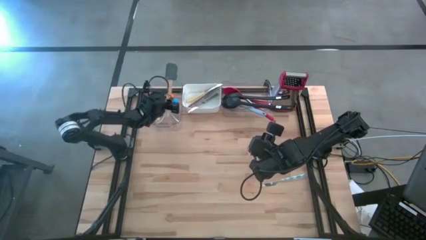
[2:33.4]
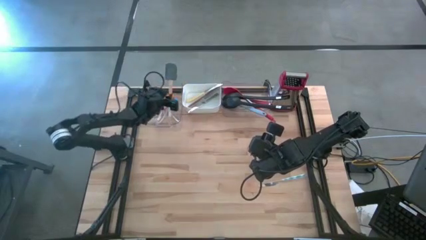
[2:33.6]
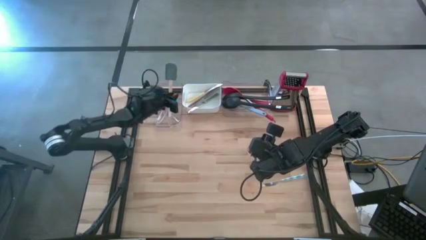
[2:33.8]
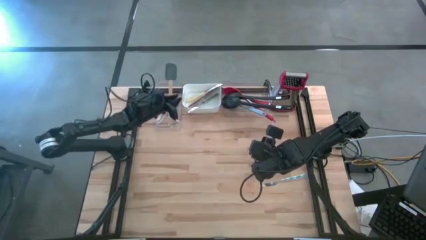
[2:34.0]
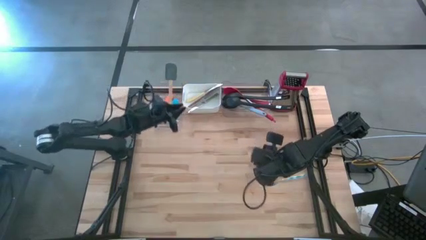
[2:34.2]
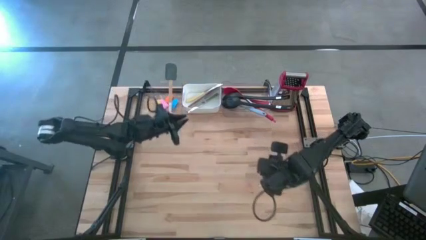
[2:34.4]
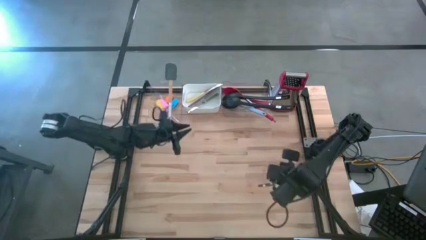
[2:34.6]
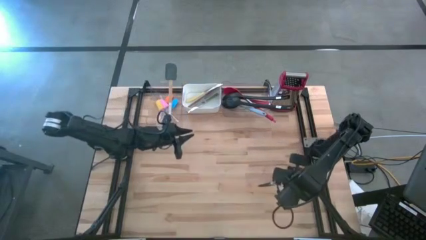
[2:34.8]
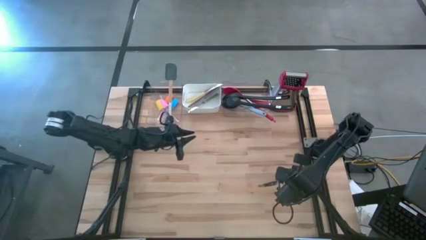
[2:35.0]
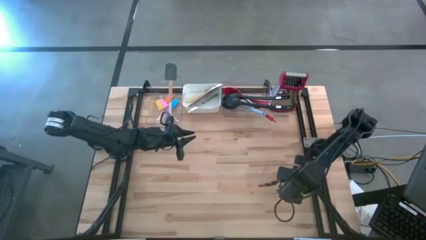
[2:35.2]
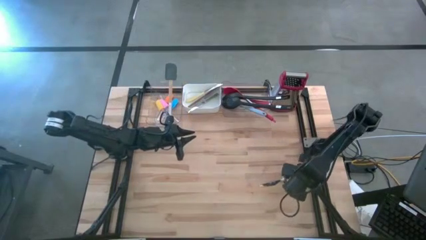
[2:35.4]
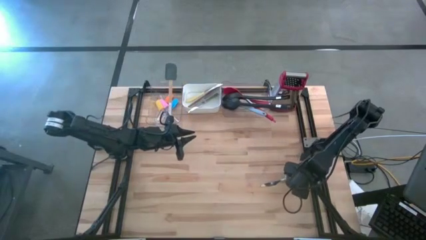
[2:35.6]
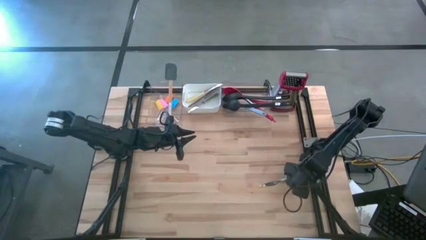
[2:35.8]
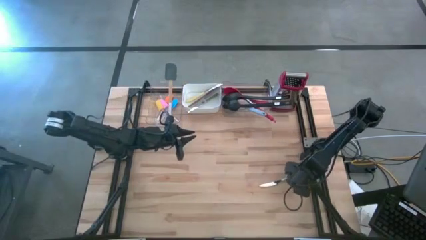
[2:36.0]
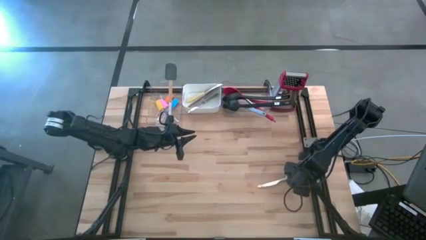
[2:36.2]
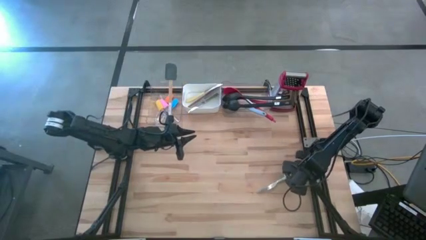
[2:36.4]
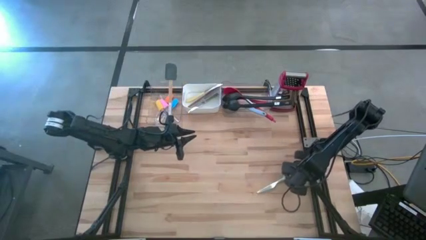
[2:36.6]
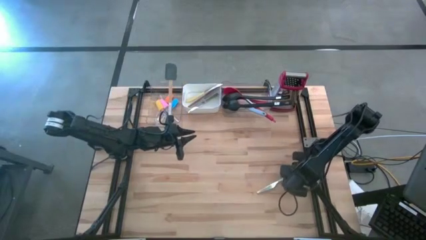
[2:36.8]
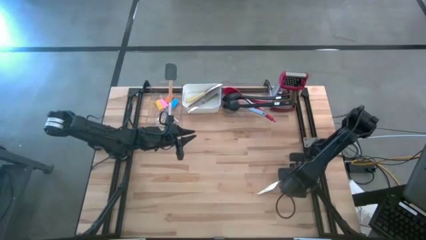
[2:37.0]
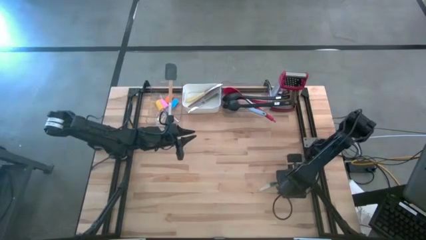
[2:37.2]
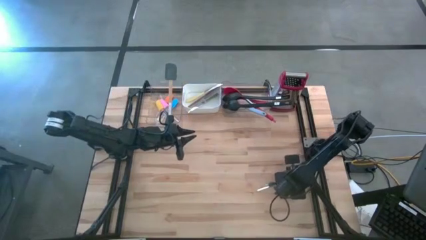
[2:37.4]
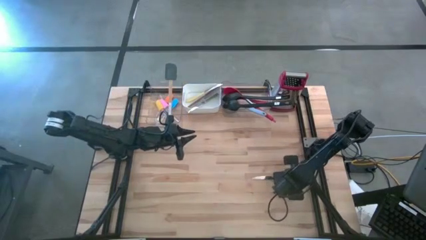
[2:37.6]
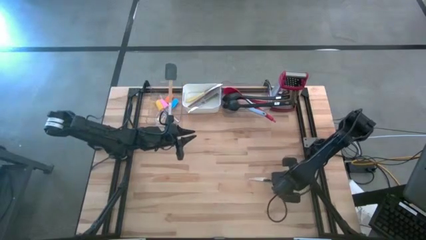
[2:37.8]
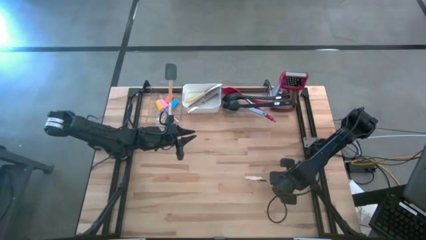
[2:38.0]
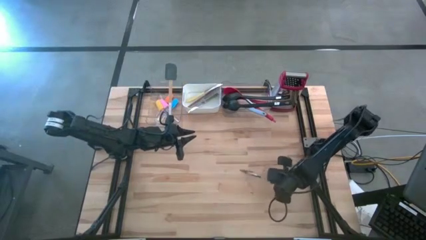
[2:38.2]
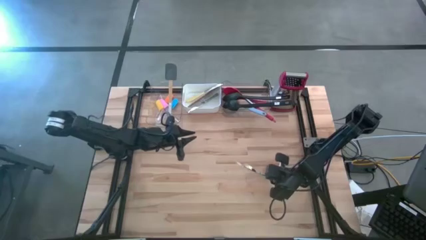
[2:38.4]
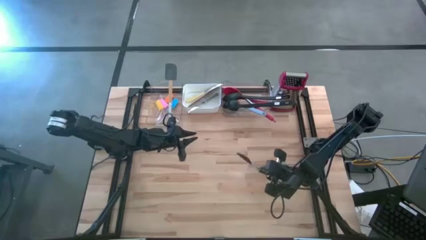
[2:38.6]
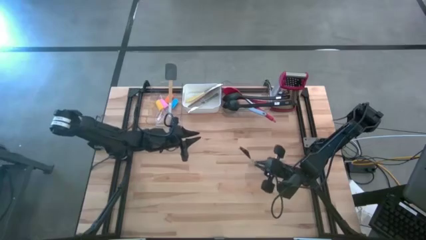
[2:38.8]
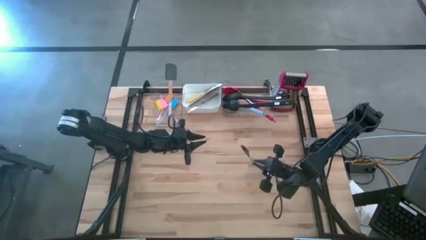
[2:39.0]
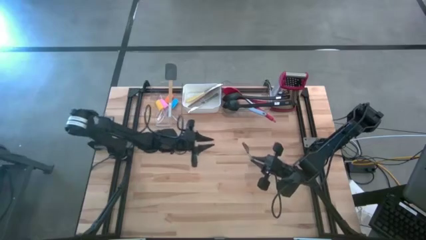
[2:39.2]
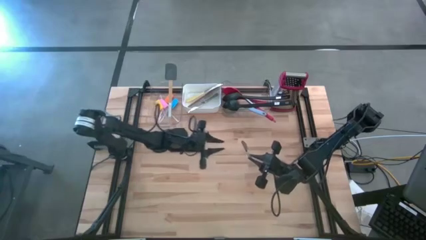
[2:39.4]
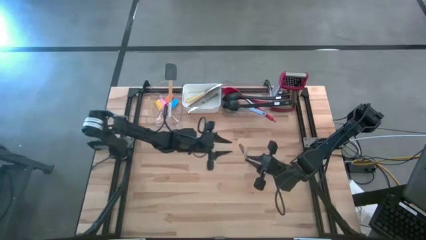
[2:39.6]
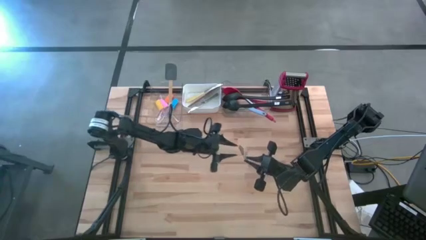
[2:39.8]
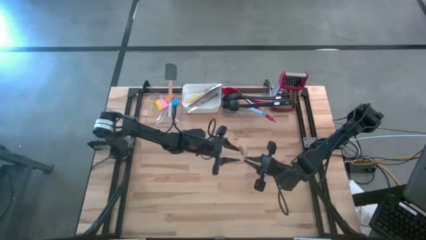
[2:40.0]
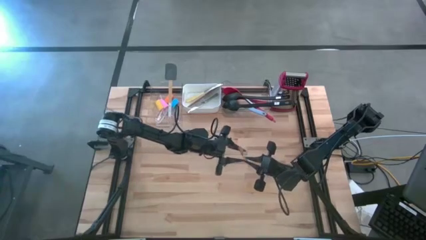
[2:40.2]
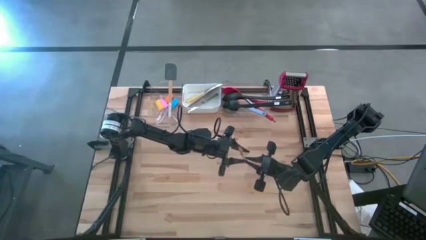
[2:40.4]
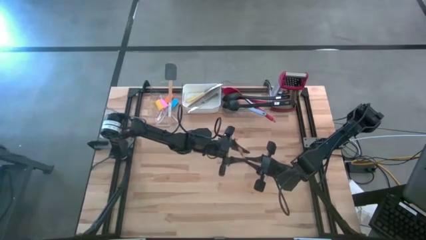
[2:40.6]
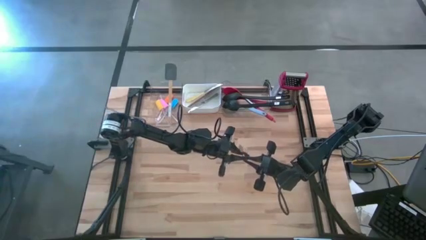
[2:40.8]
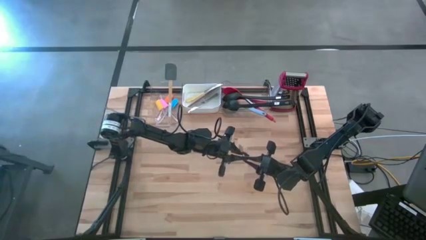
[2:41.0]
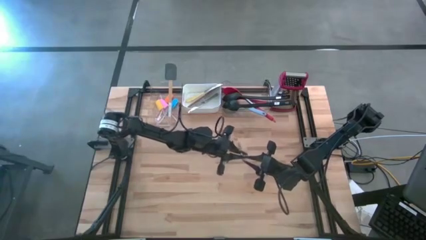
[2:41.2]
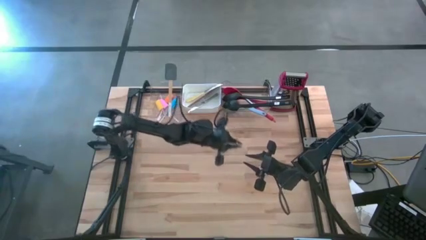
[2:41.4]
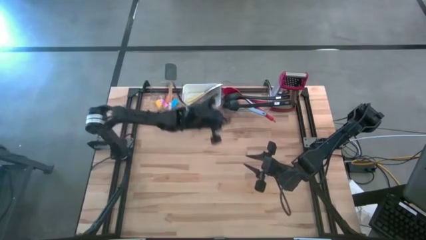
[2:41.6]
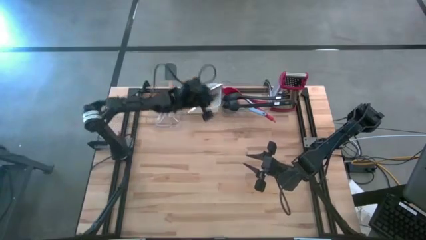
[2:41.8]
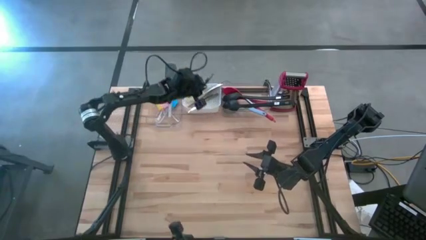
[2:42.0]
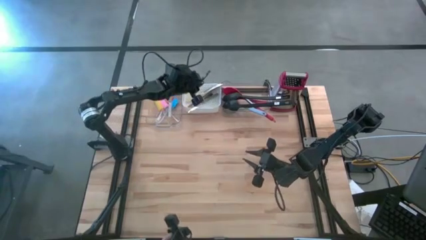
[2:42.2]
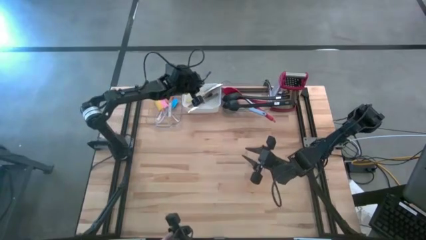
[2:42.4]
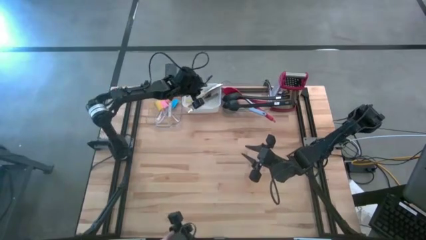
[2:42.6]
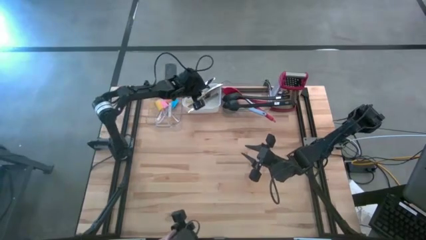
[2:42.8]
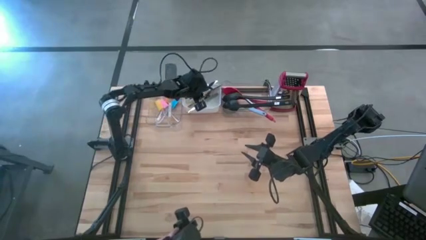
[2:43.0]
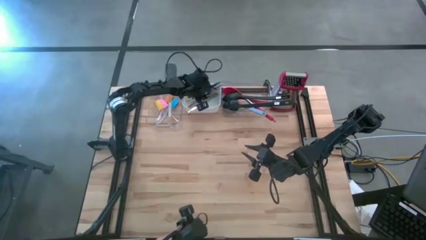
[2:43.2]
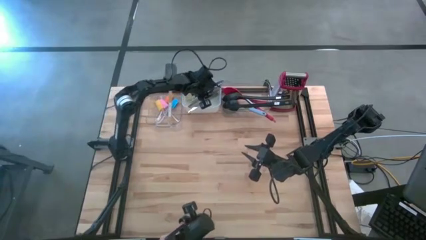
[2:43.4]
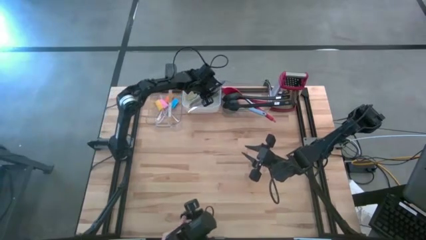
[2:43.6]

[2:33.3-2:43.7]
Task: Pick & Place Kitchen Items
Put the white and blue knife into the white bin

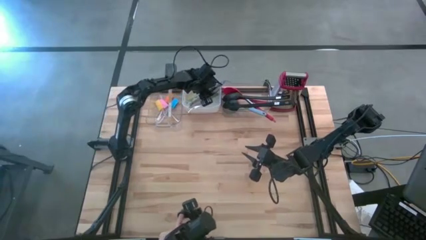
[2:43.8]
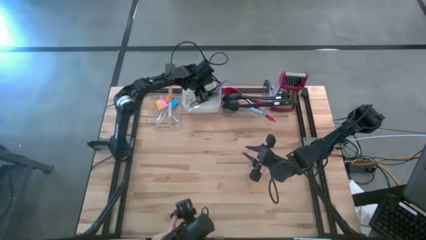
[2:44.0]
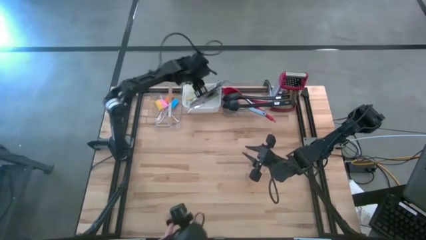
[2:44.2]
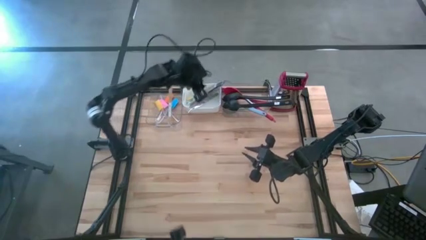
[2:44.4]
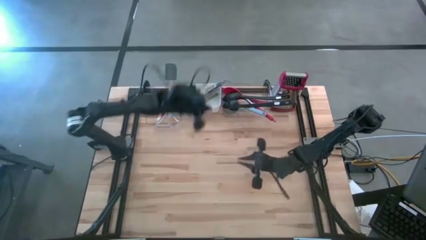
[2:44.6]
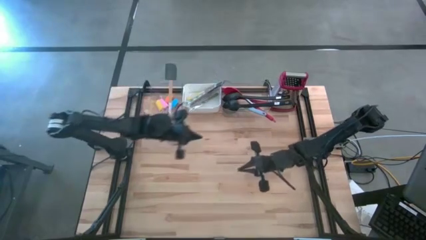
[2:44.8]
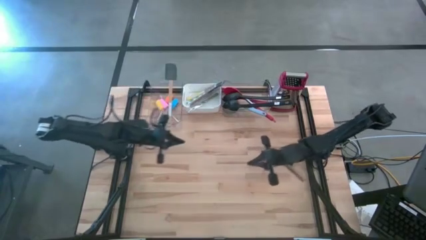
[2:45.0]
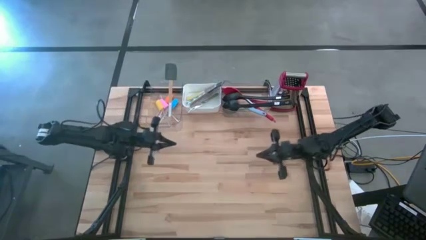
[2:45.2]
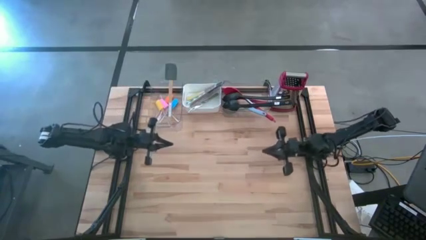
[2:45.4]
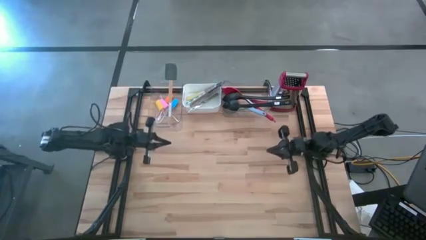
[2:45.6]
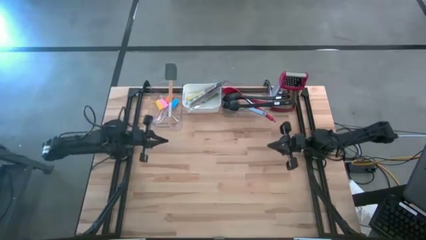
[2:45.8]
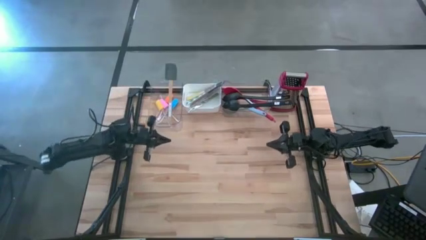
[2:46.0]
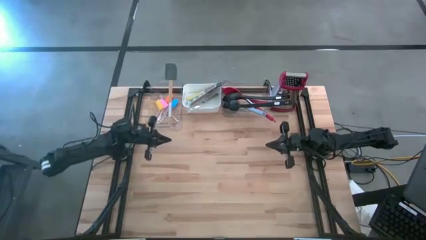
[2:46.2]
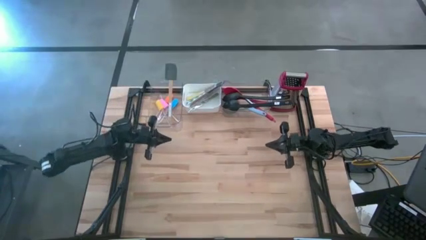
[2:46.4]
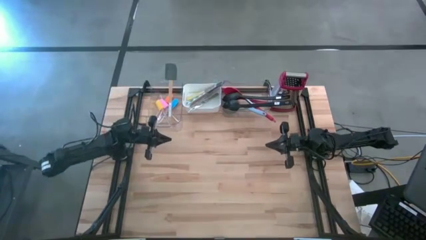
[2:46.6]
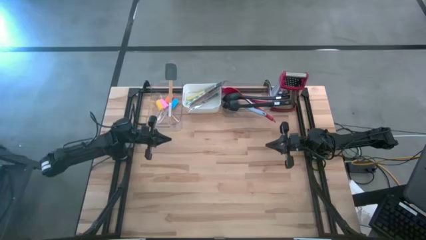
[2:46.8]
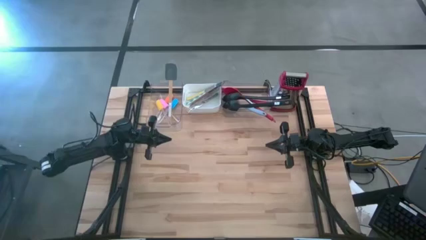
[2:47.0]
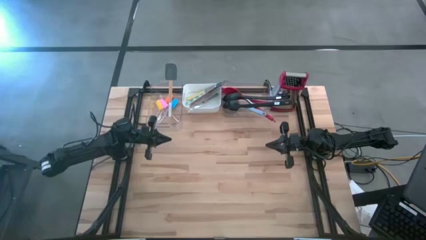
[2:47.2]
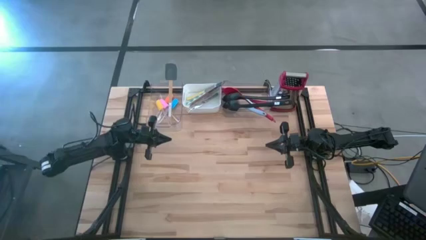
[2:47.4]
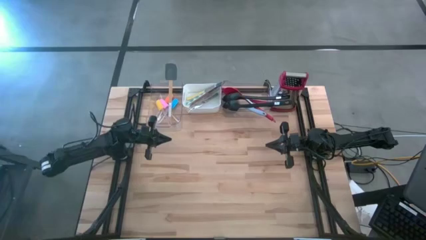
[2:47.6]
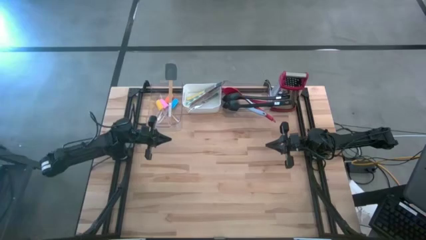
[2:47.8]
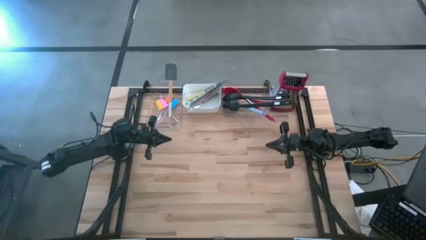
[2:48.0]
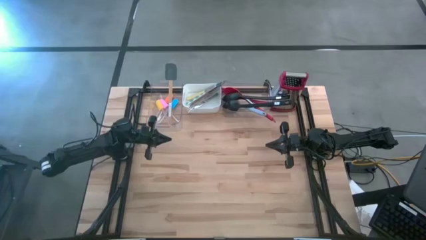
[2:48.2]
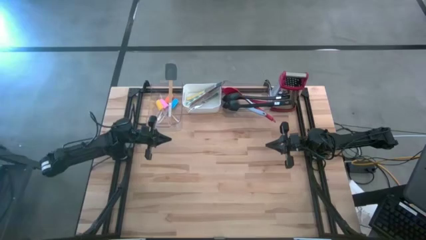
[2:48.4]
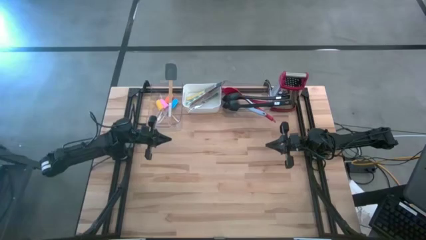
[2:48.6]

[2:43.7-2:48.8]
Return to home position
